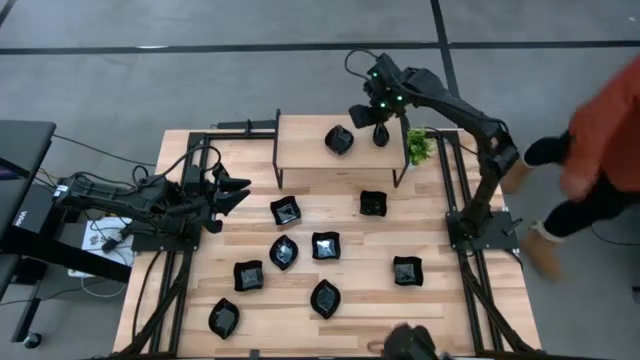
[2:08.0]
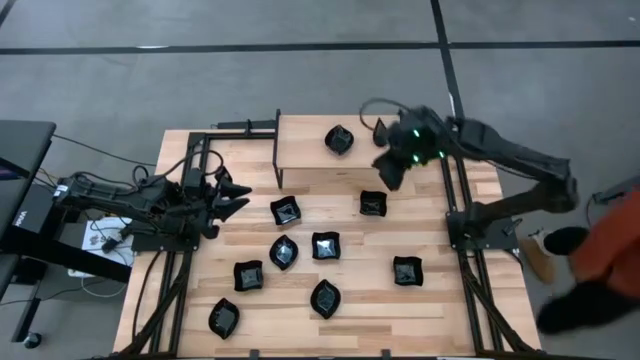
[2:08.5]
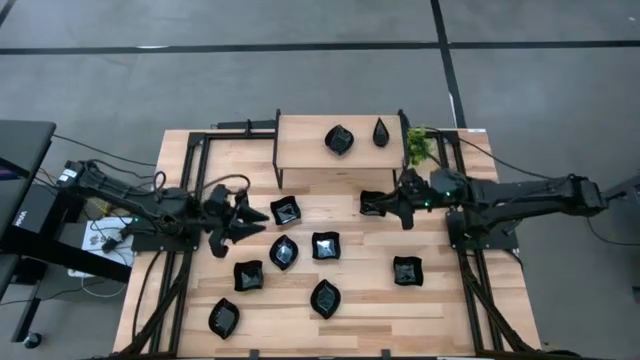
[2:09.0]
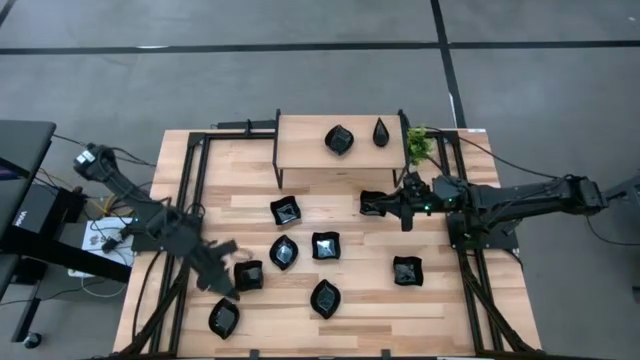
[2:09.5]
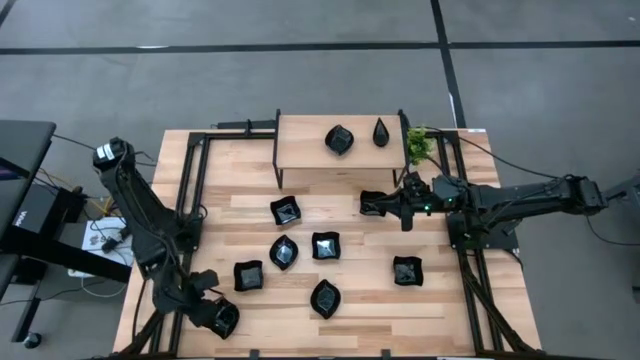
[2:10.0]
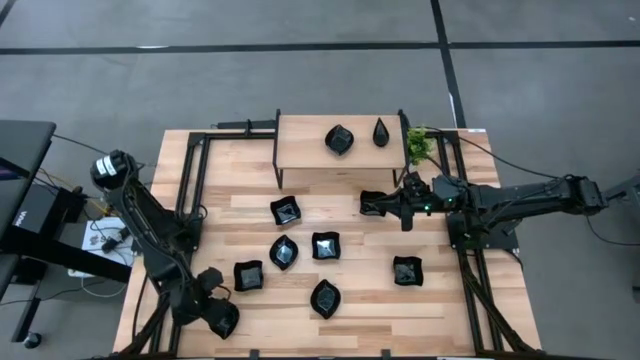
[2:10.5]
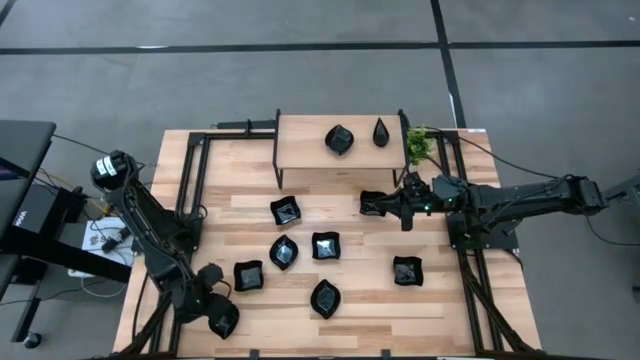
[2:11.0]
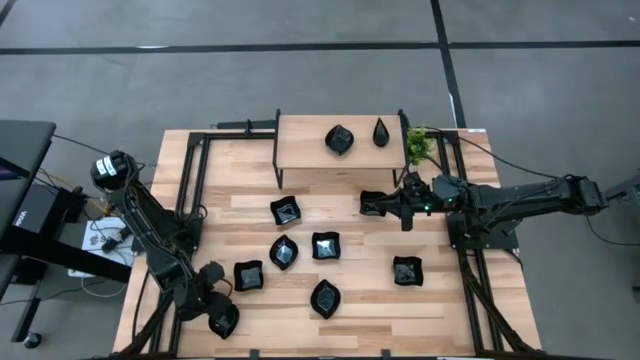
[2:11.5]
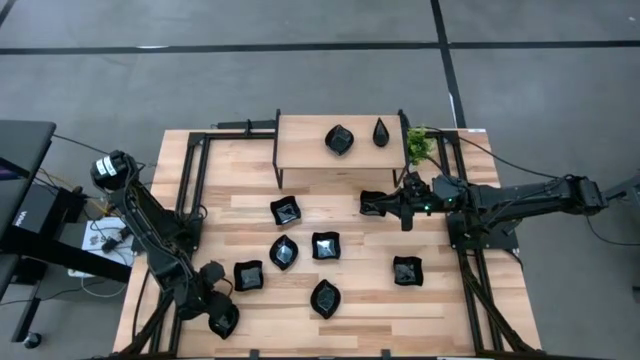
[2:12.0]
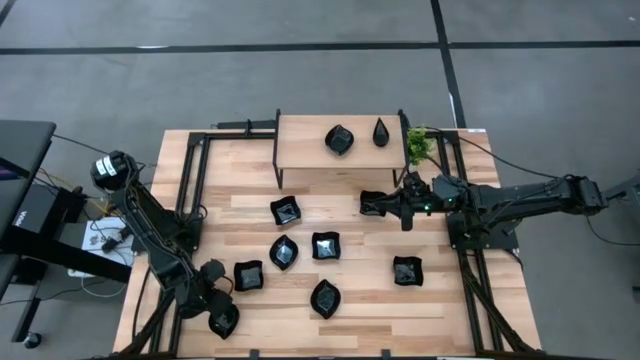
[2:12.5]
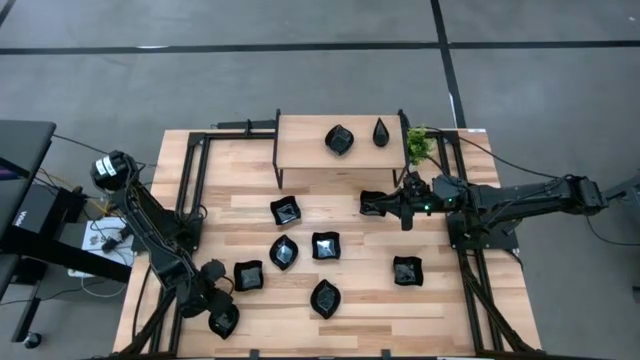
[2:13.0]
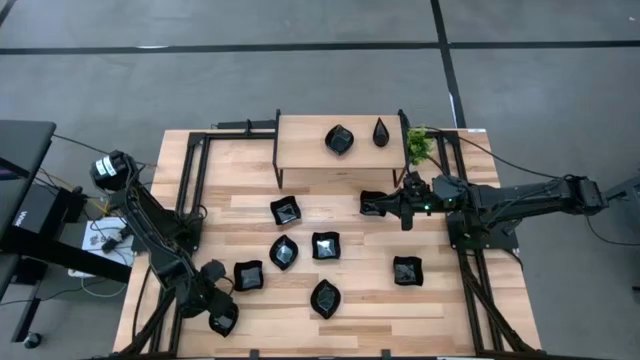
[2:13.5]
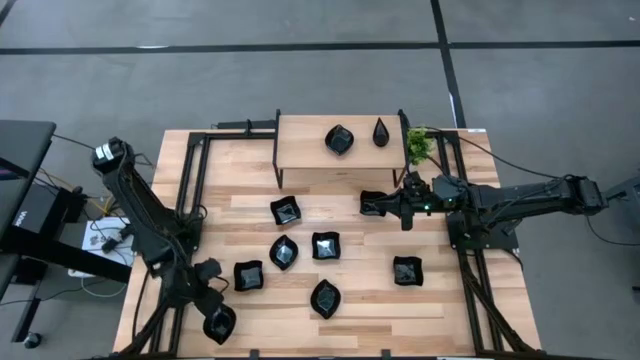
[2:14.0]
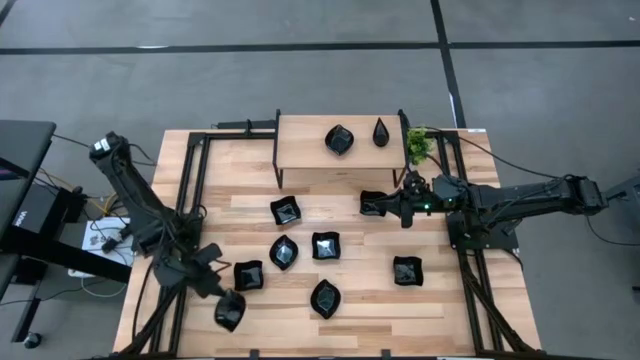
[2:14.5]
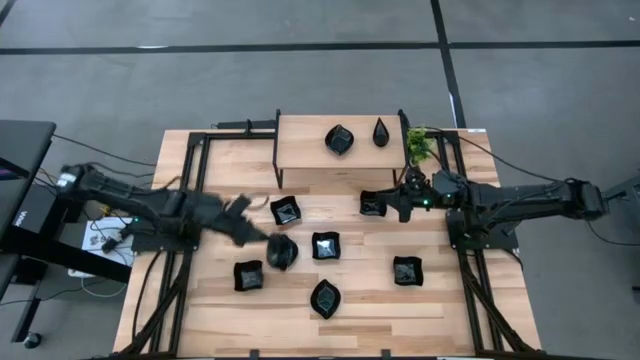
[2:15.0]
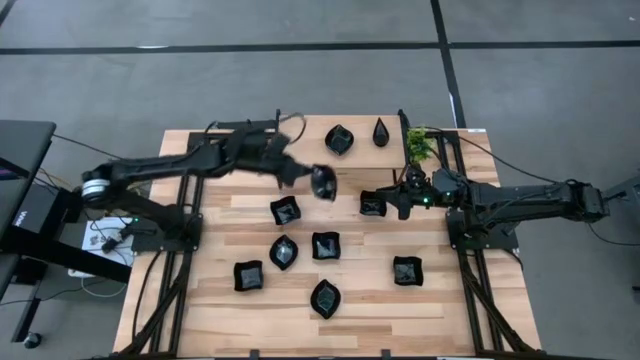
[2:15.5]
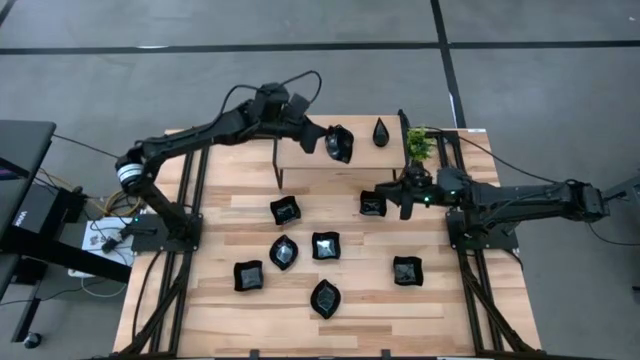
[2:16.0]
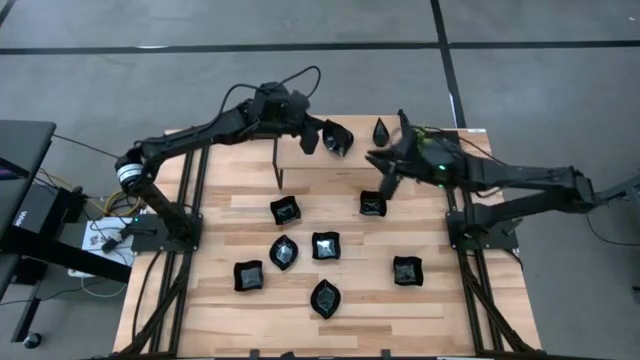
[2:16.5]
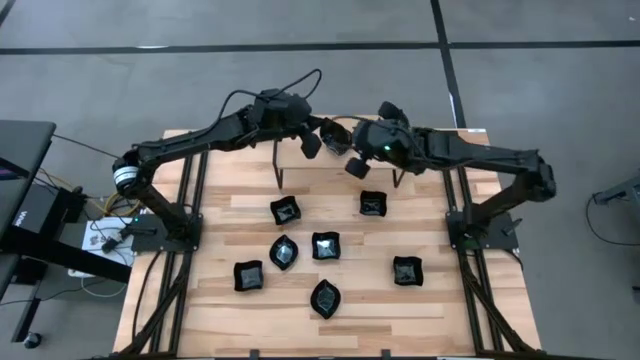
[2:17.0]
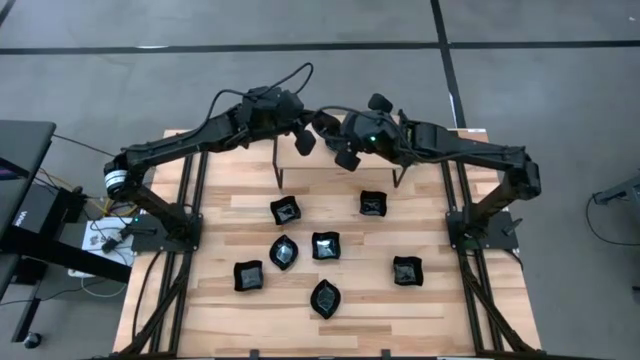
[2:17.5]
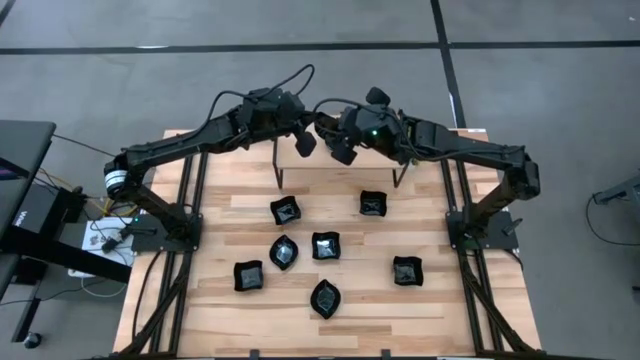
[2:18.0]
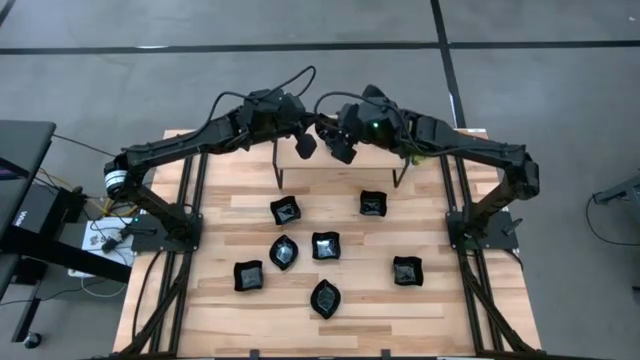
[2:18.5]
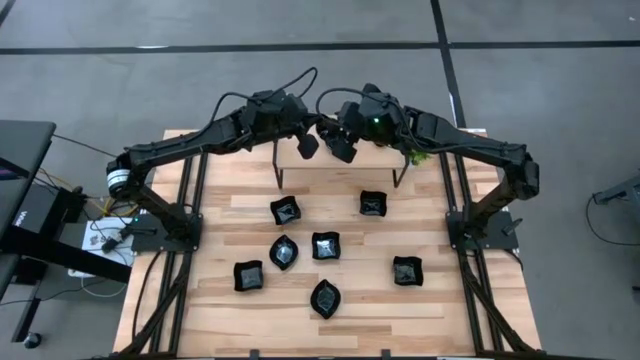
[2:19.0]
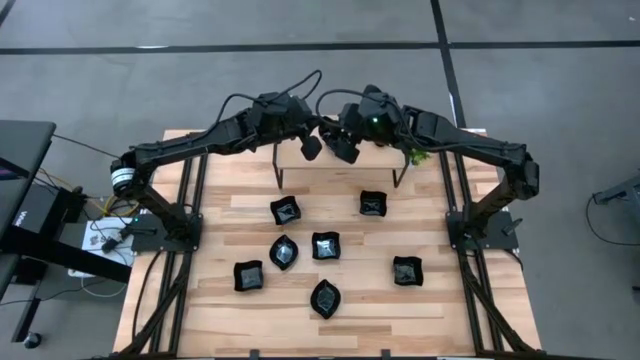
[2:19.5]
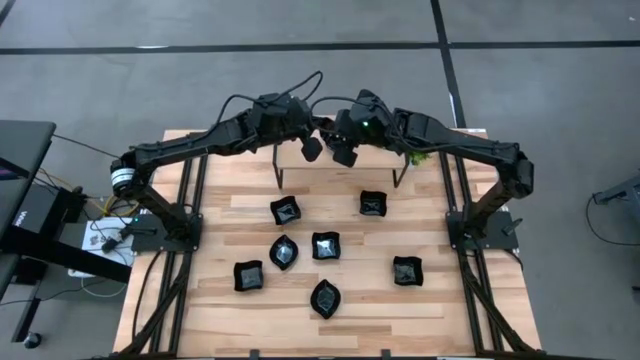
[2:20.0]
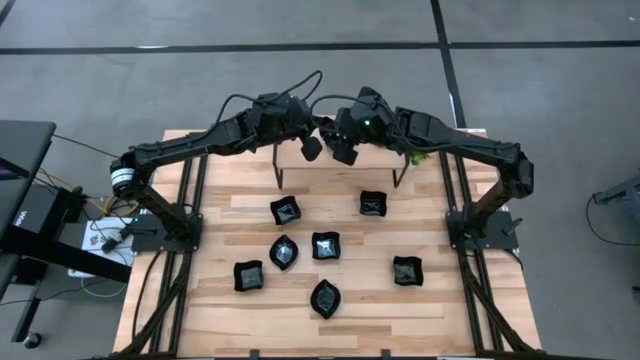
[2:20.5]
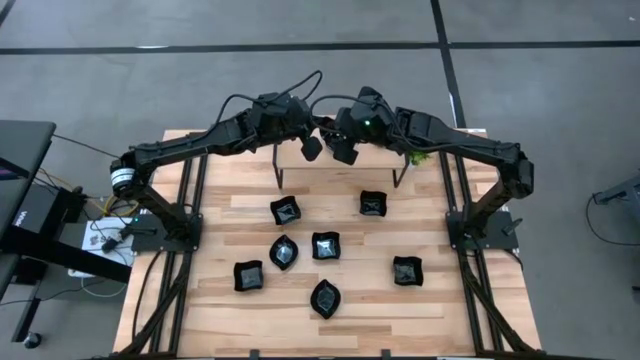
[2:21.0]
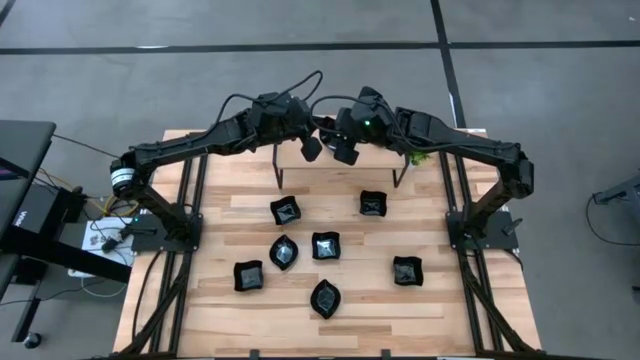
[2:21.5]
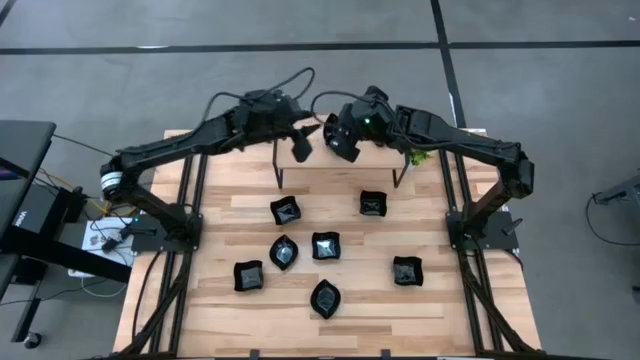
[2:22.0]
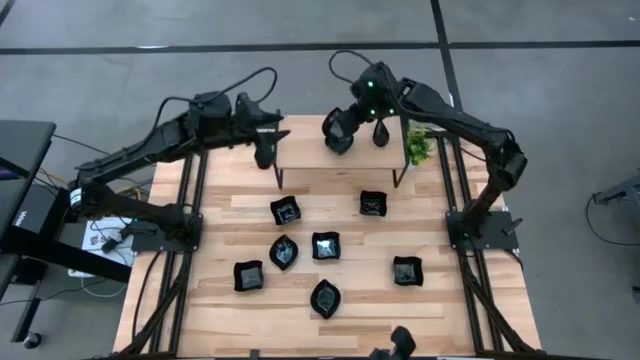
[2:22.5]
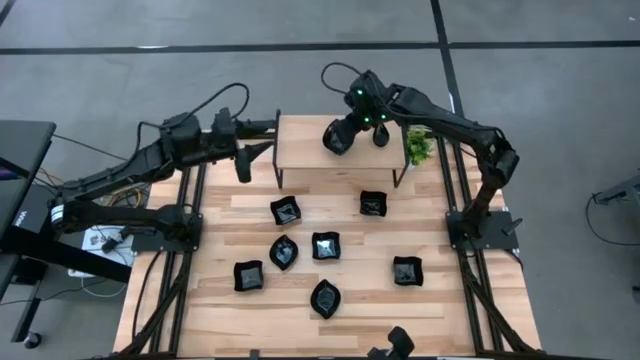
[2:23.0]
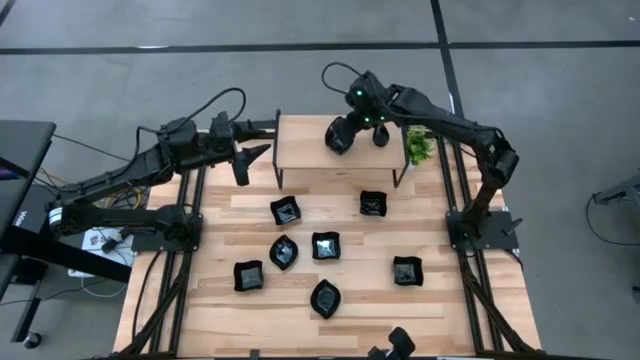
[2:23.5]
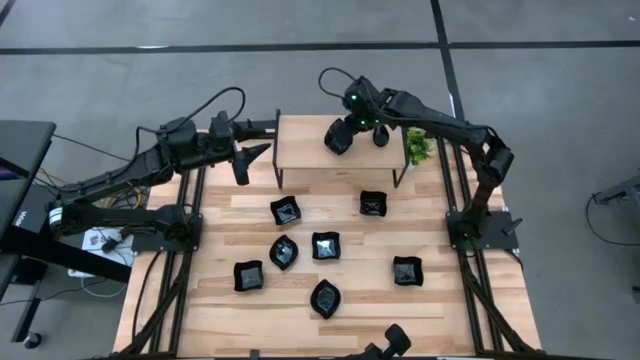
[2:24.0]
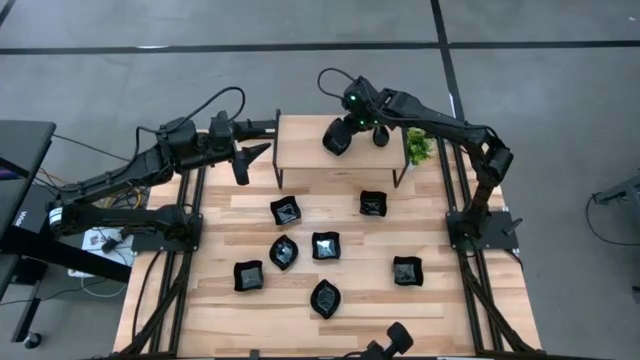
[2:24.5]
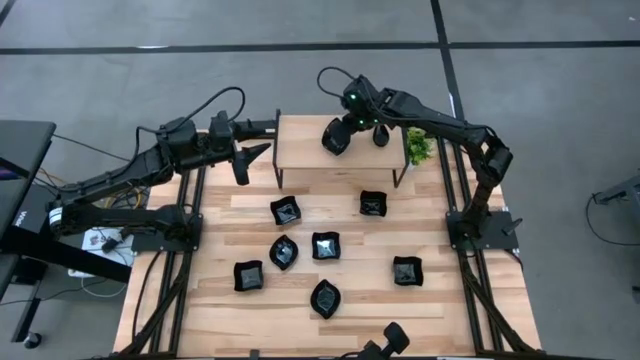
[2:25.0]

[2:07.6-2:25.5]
Task: Pick & Place Mini shaped plates
Stack the leaf-shaped plate on top of the leaf-shaped plates on the shelf

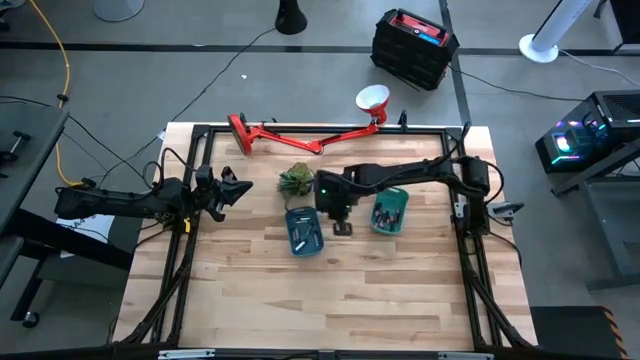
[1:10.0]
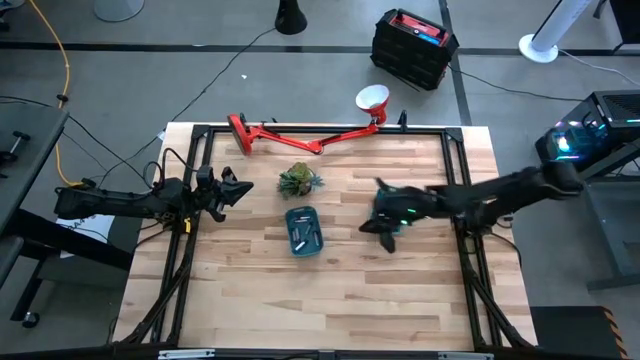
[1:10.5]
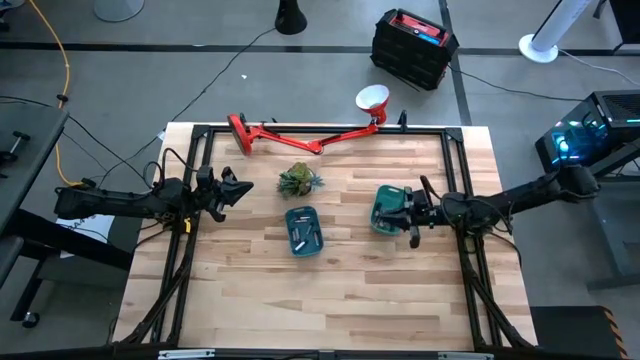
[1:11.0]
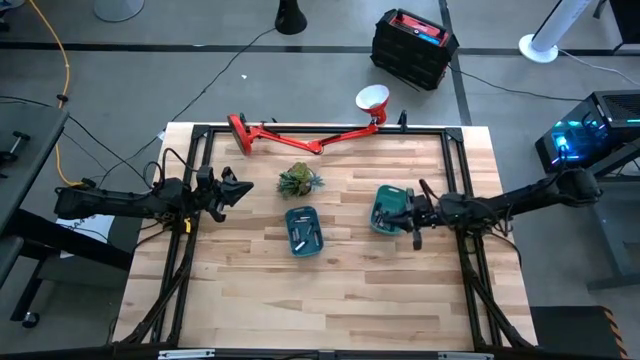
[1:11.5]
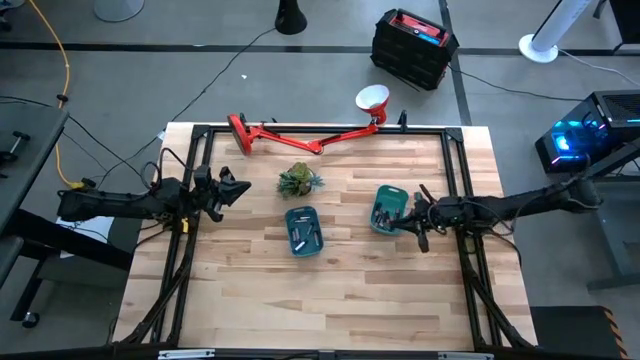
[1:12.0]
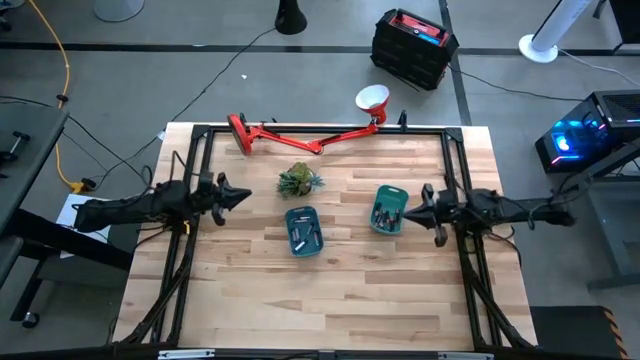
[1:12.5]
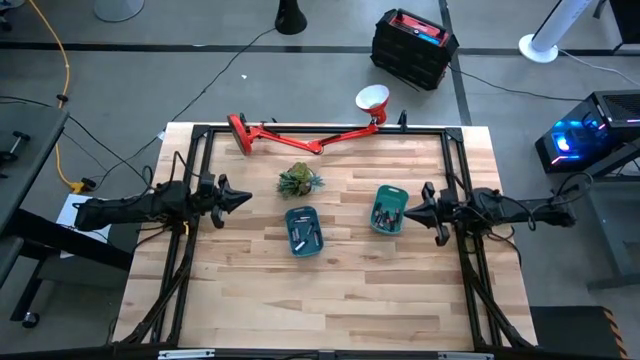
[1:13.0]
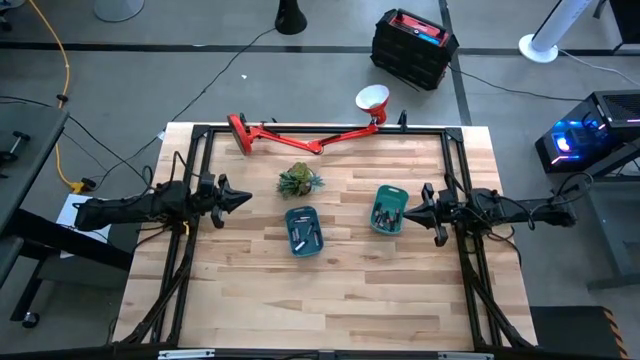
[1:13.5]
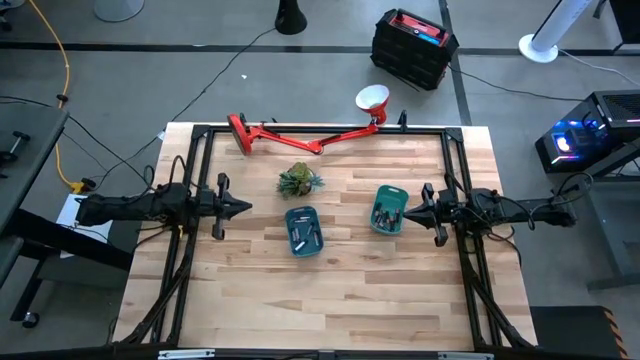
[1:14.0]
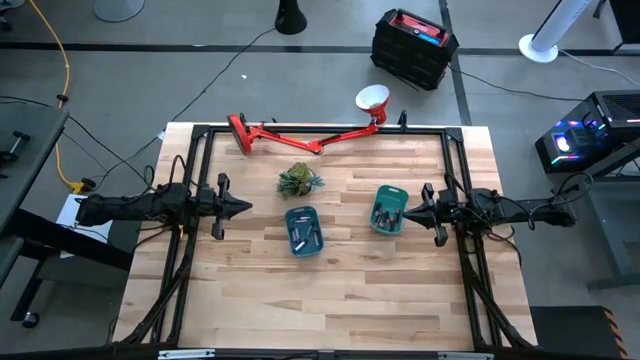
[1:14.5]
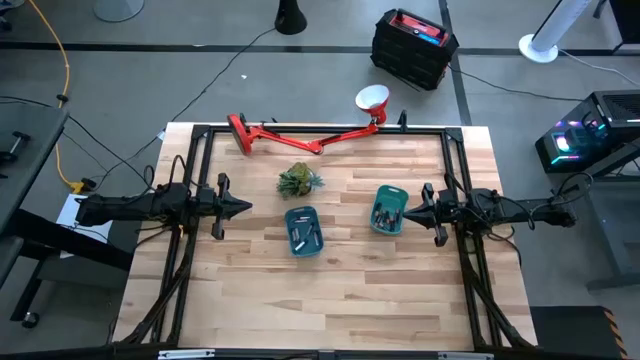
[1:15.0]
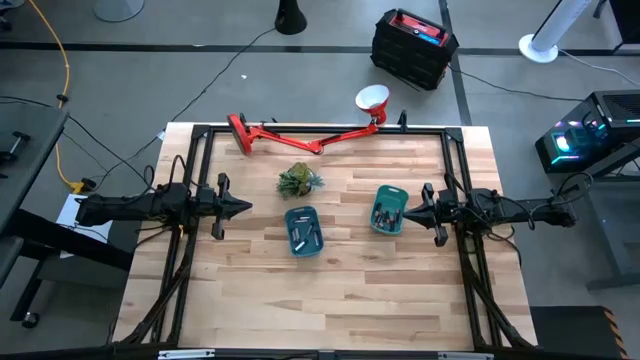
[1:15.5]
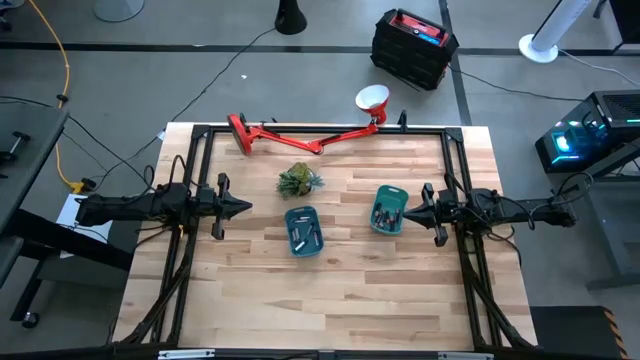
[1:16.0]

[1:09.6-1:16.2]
Task: Sort batteries
Return to Home Position
